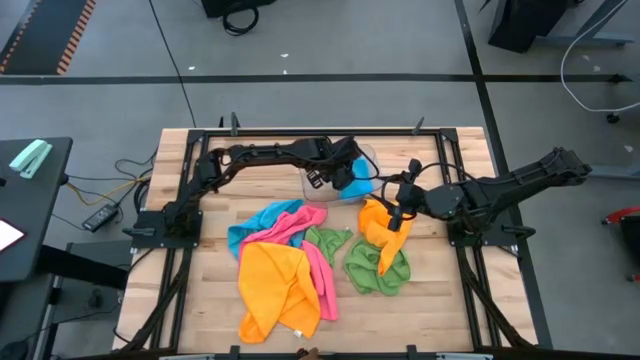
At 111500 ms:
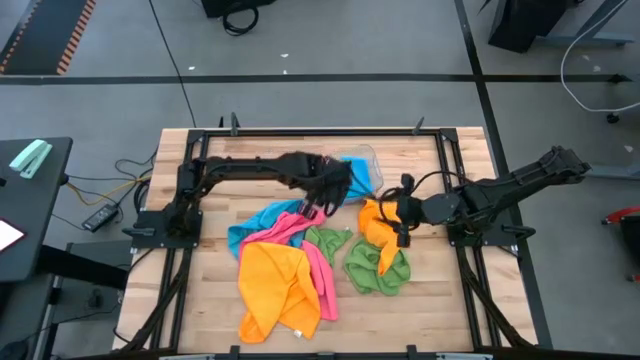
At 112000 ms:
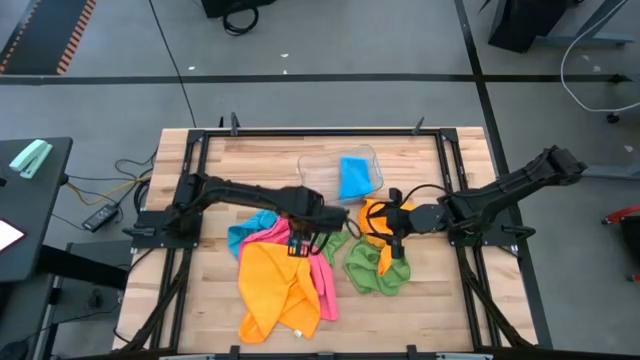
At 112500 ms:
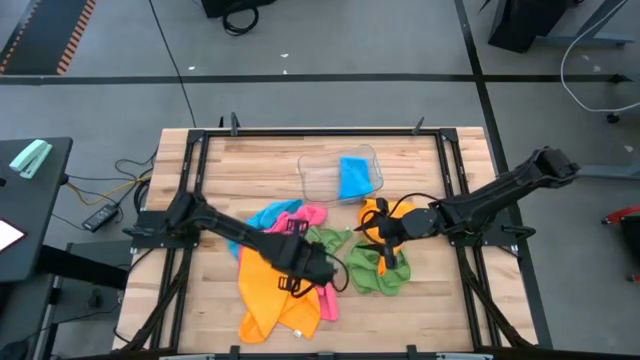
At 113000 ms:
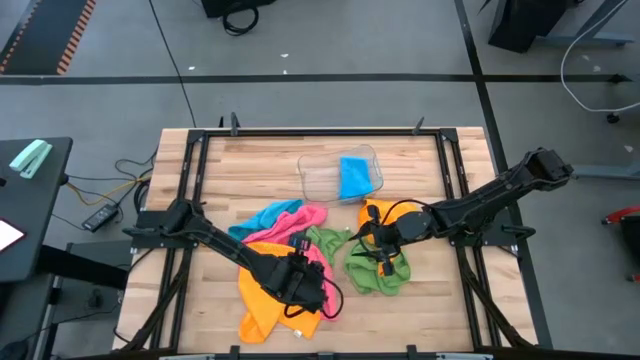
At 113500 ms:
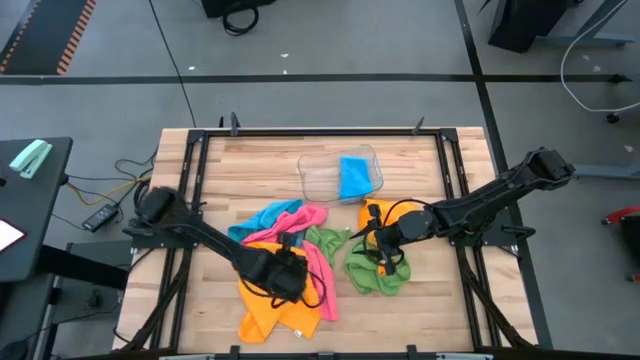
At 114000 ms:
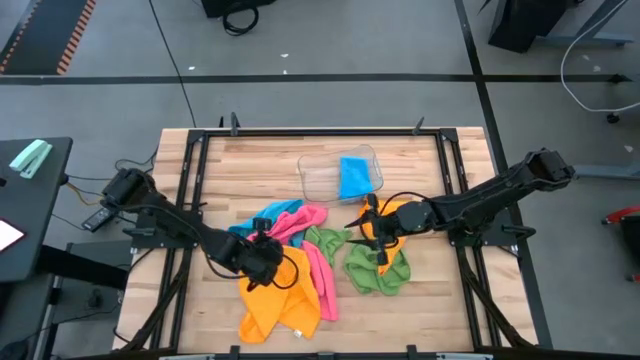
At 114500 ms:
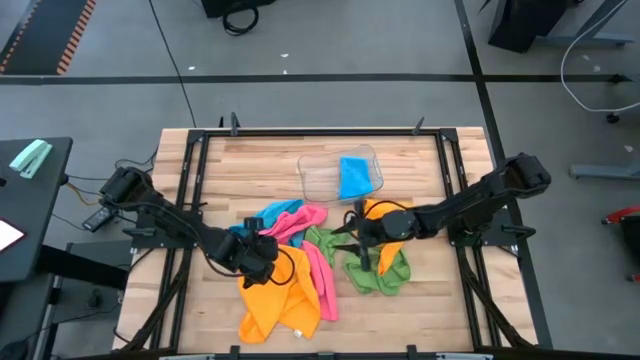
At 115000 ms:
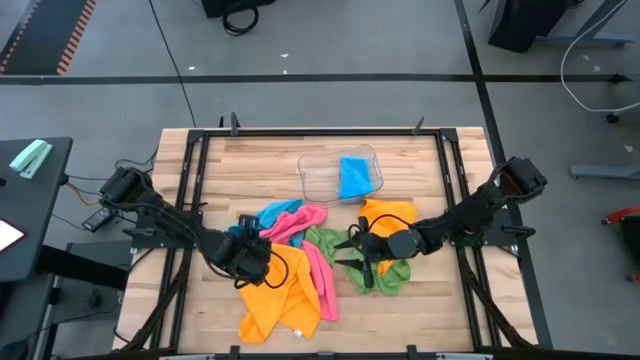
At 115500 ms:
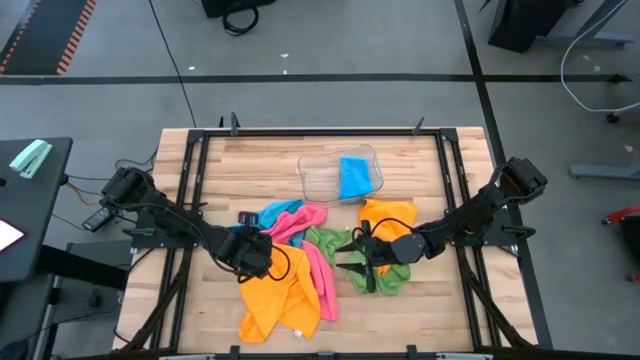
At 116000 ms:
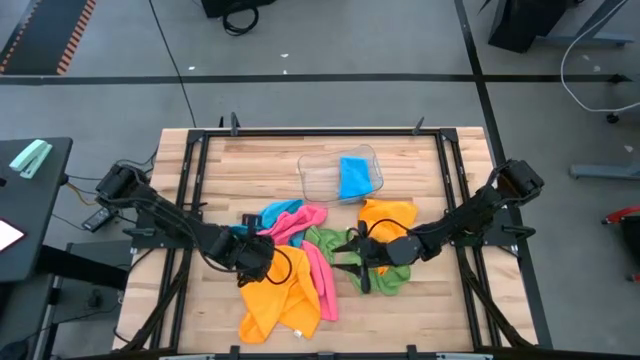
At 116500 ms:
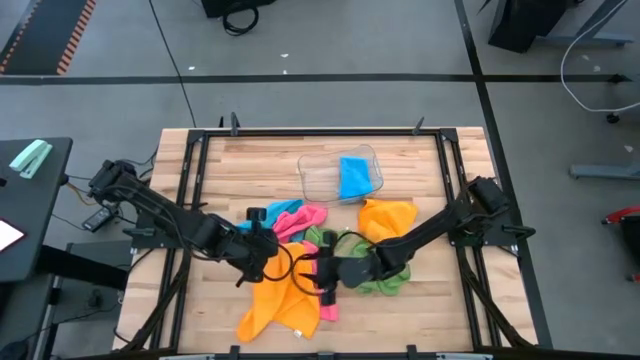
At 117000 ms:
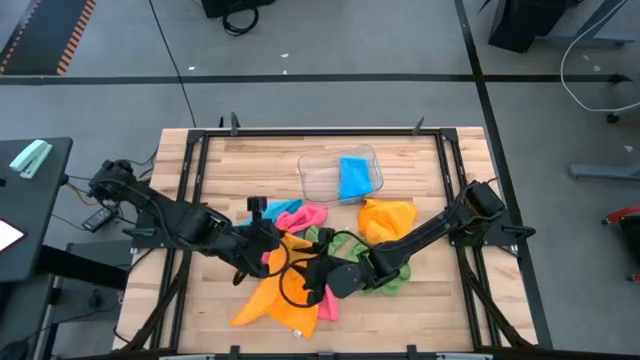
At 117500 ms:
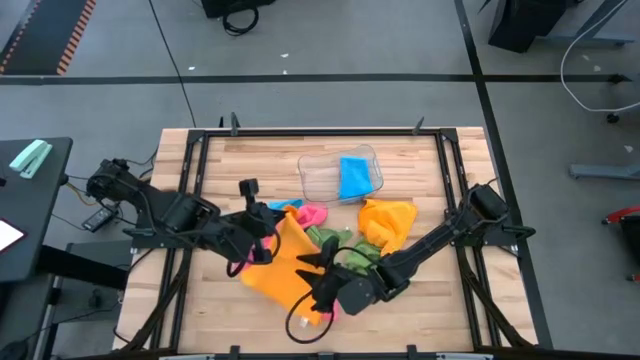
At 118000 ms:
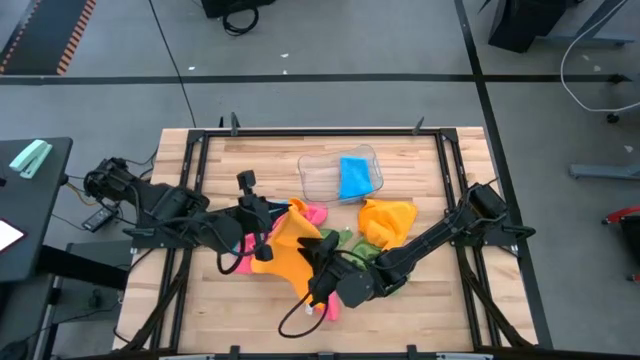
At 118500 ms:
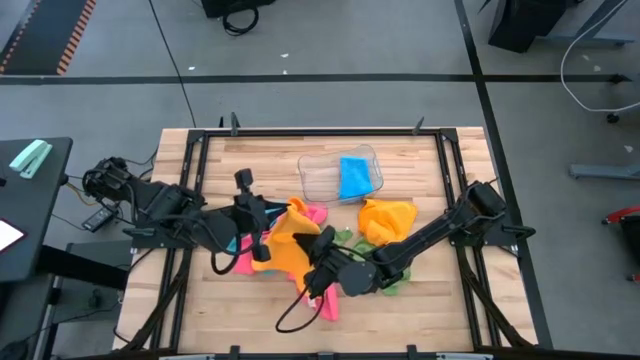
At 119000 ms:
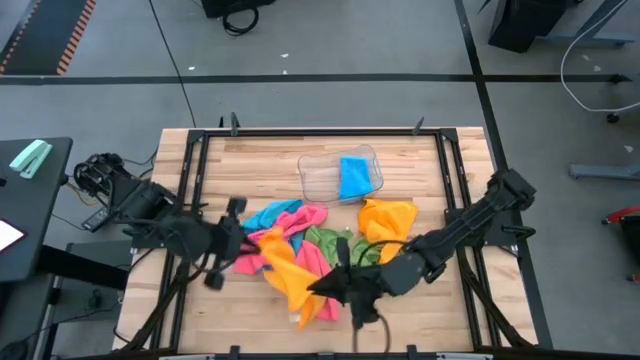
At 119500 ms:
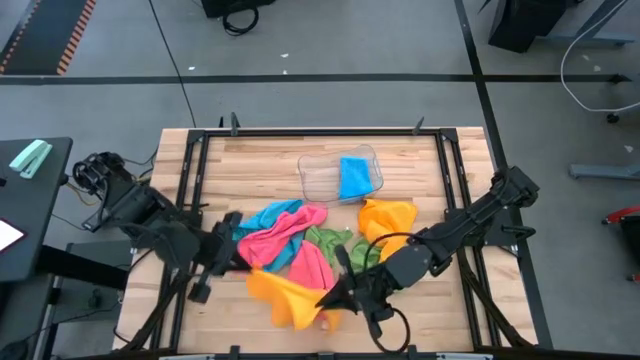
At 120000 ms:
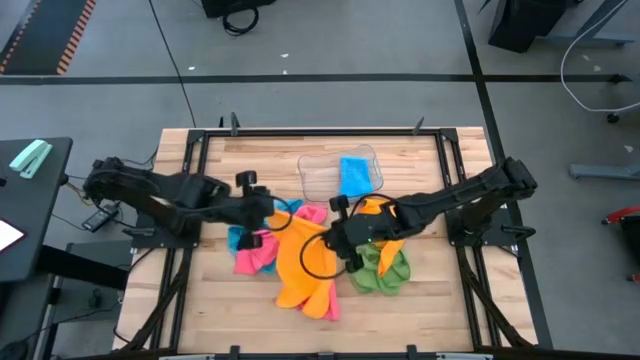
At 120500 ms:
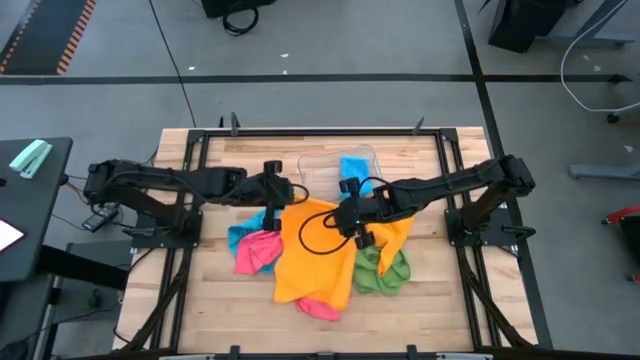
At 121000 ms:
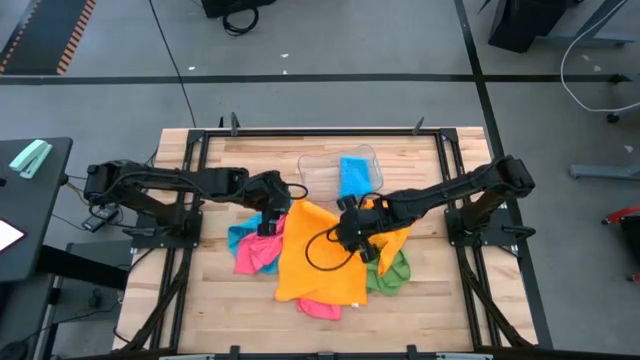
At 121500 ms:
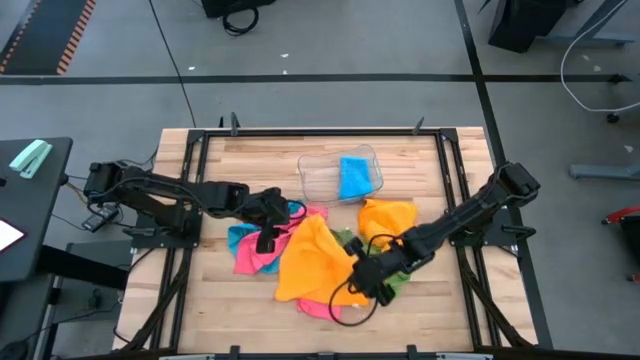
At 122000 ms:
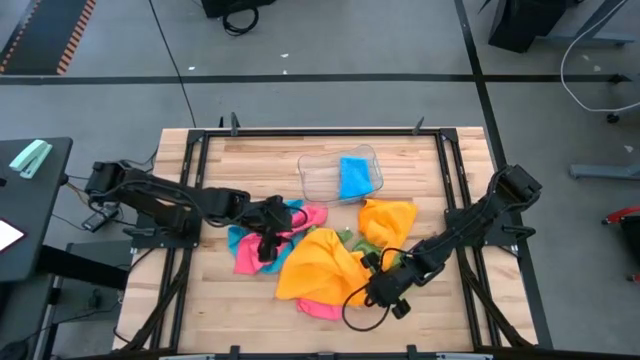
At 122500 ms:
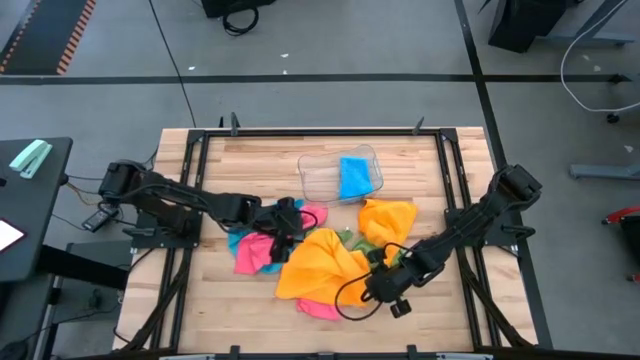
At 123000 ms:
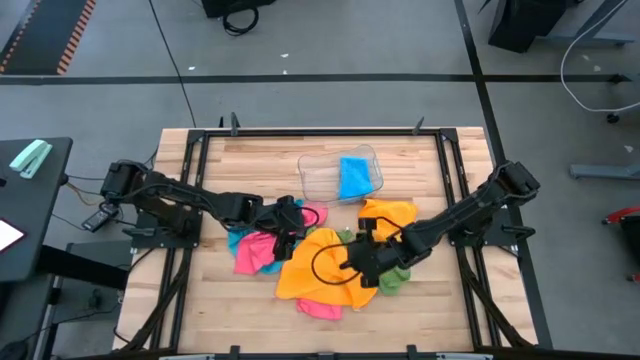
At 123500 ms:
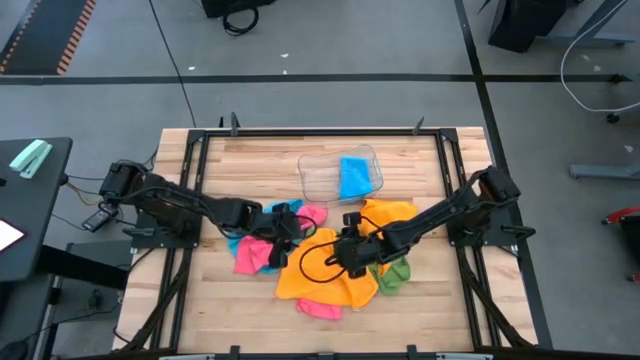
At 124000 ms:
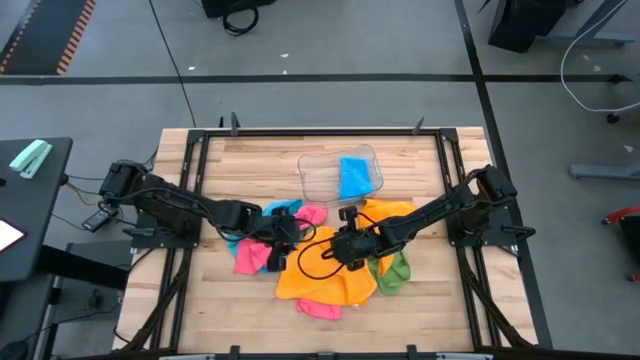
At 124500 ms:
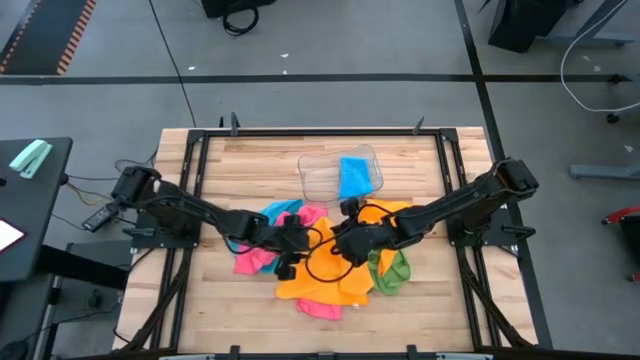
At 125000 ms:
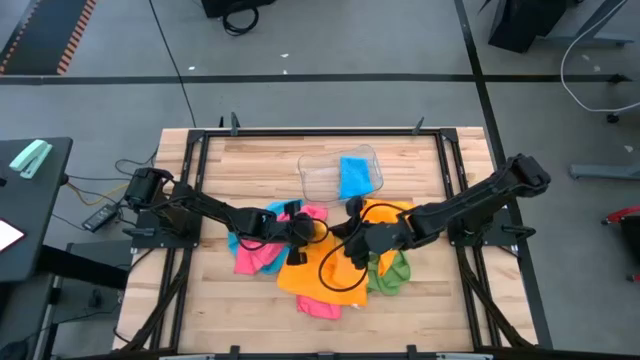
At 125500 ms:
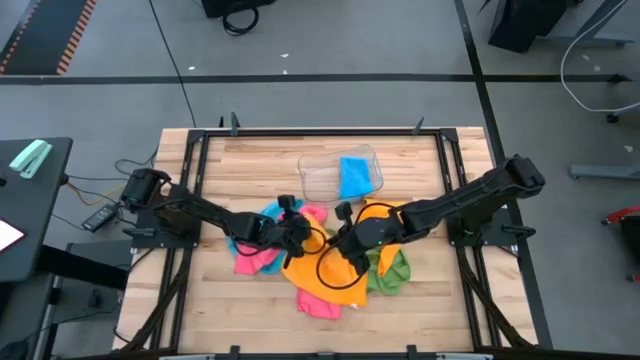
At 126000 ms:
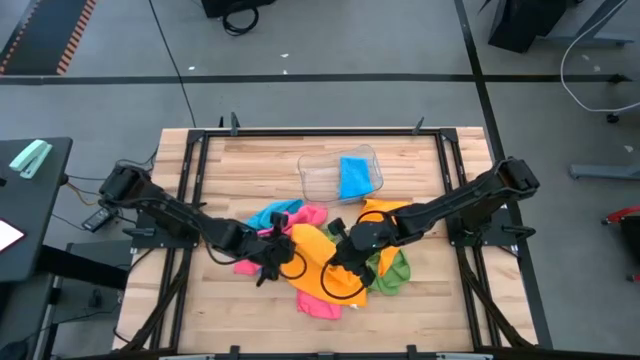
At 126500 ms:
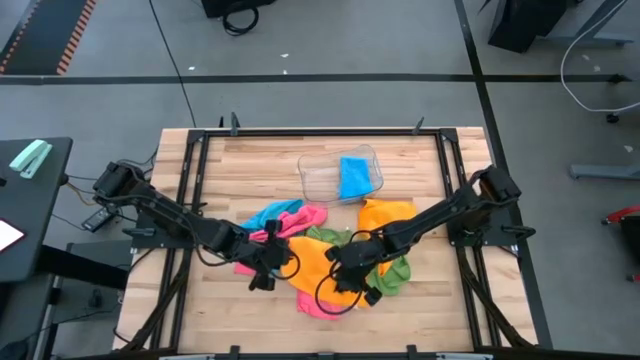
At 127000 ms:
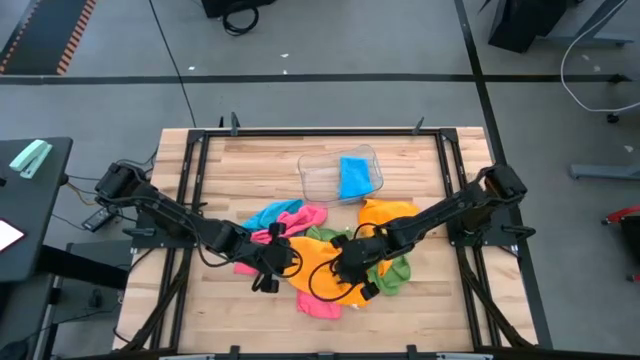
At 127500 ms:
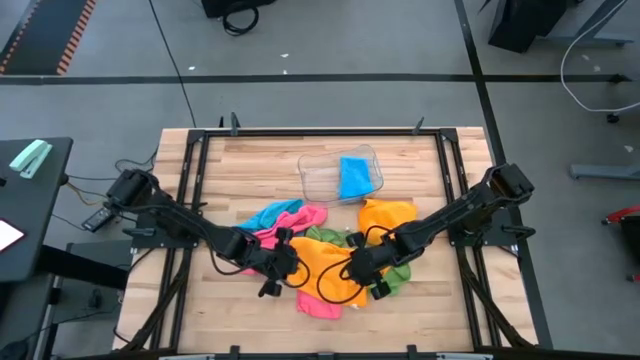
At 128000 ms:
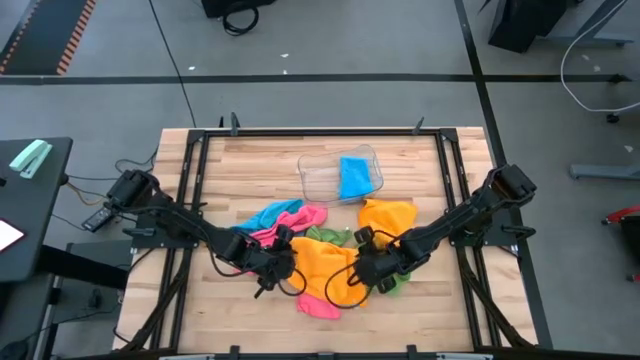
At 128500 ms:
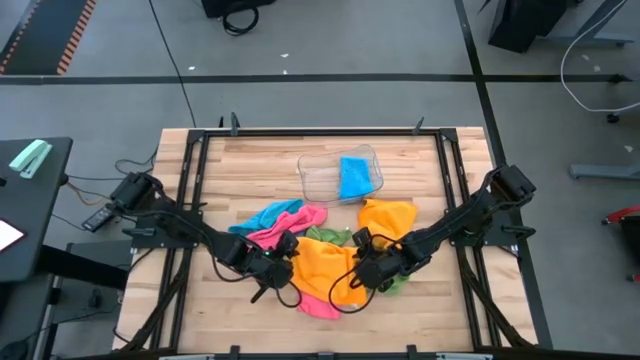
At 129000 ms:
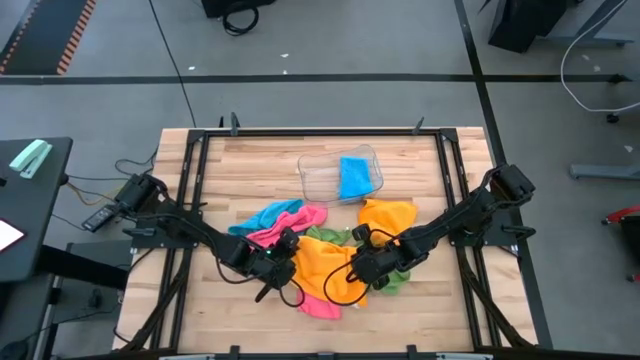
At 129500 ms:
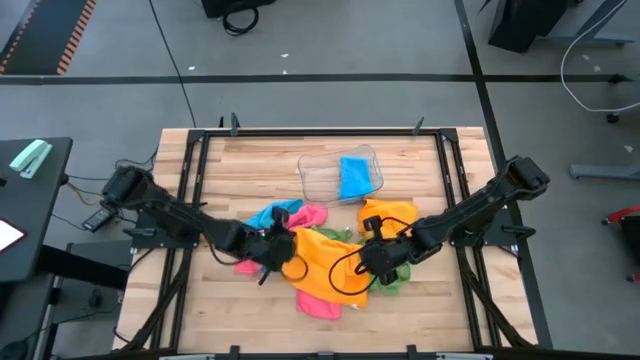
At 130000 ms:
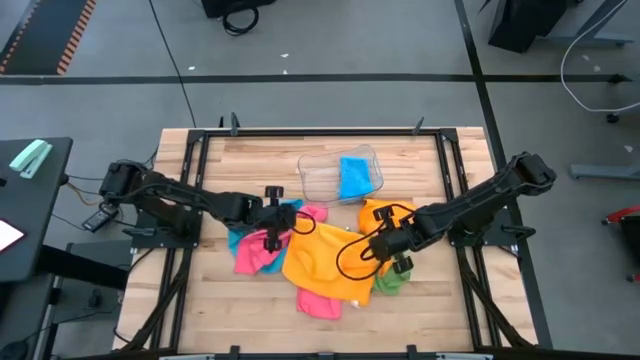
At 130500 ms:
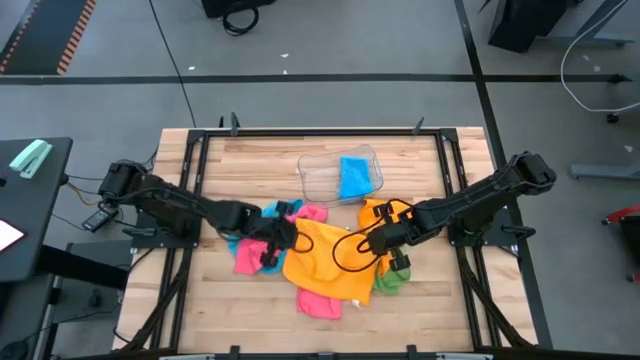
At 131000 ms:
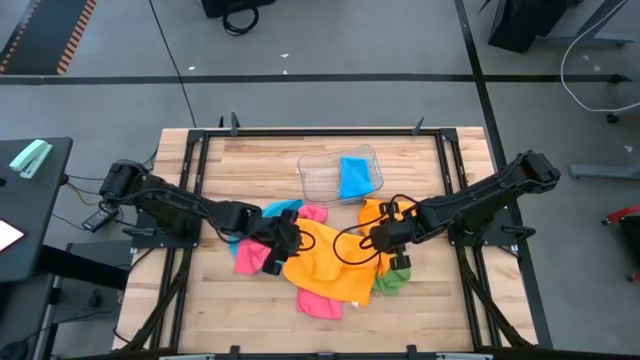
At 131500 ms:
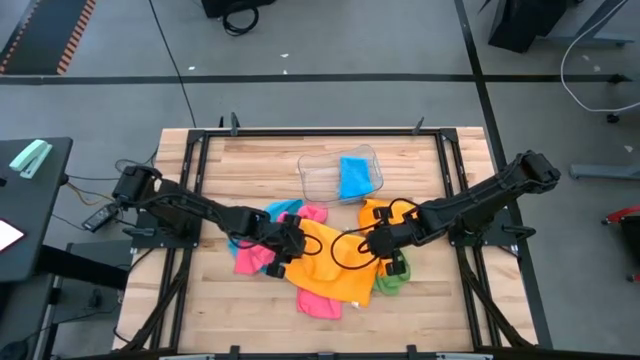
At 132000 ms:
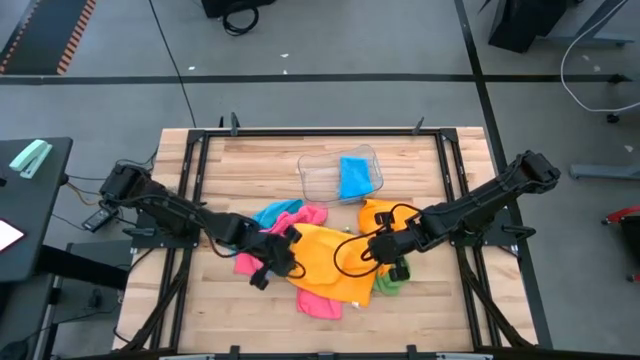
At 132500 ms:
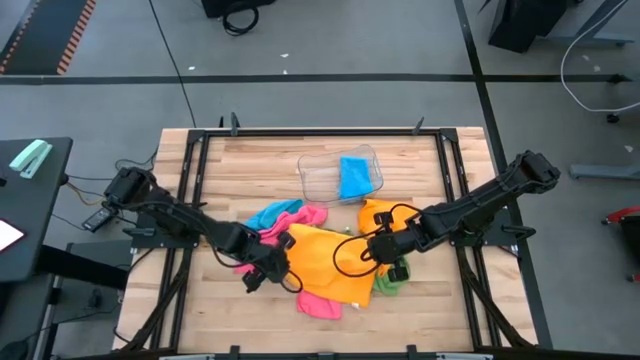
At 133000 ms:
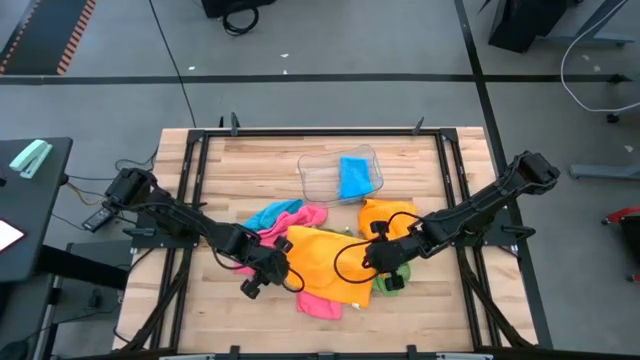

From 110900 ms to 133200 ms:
Task: Fold microfiber towels
Fold the left yellow microfiber cloth
